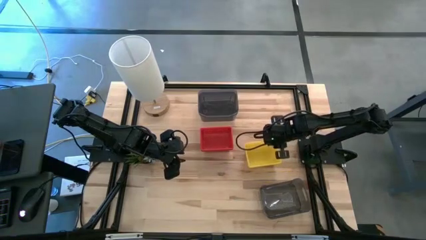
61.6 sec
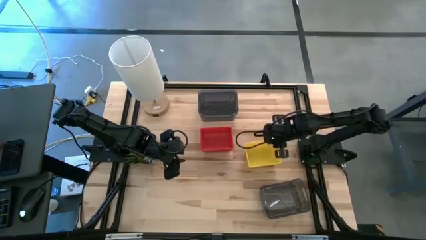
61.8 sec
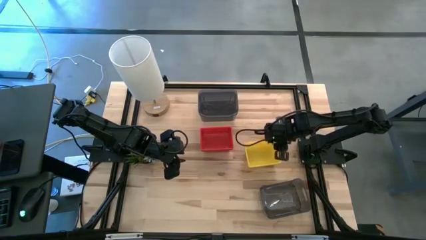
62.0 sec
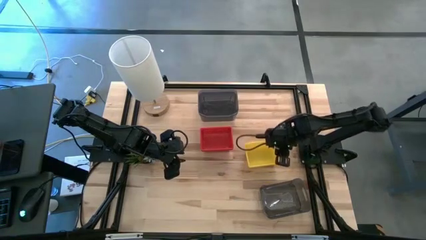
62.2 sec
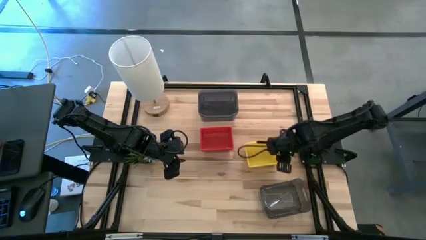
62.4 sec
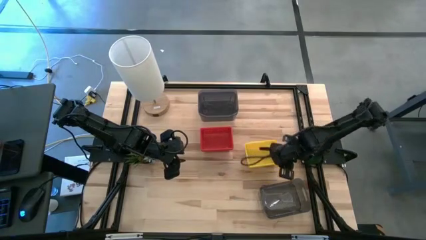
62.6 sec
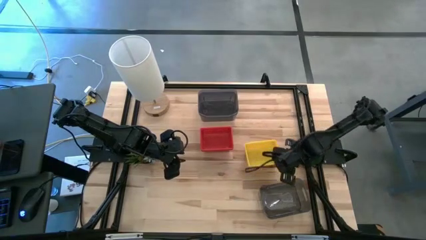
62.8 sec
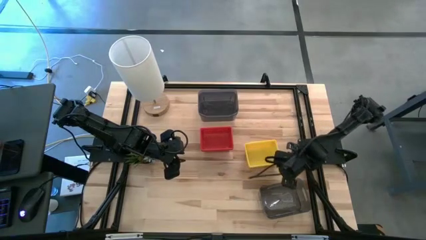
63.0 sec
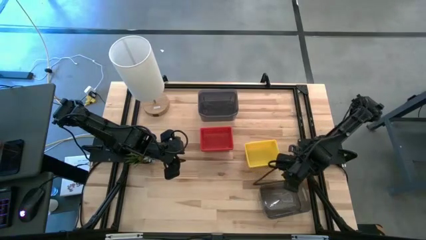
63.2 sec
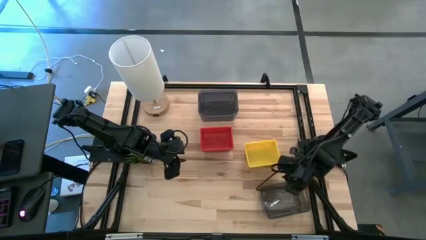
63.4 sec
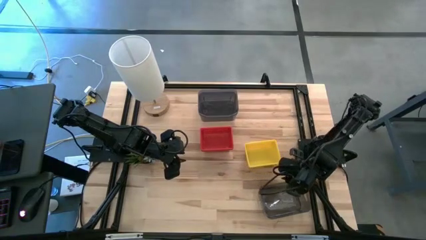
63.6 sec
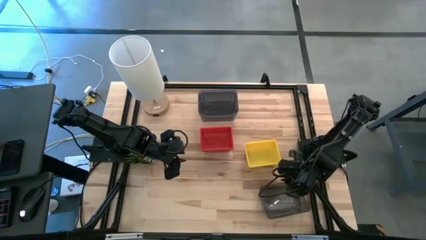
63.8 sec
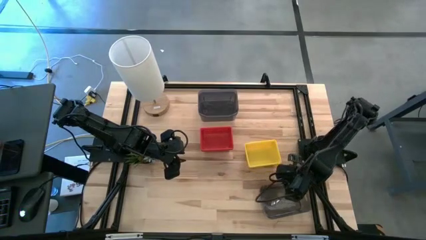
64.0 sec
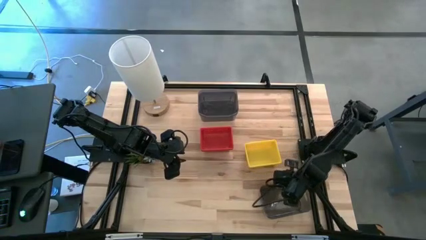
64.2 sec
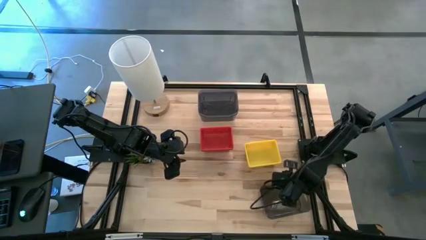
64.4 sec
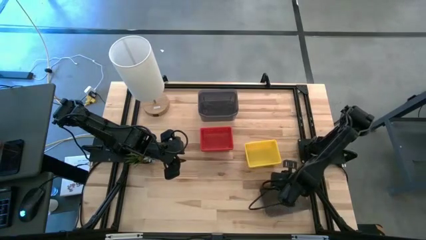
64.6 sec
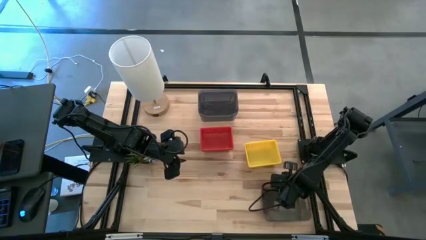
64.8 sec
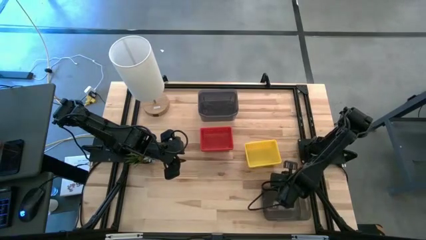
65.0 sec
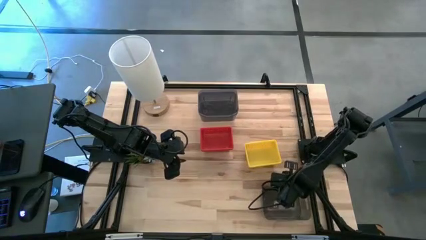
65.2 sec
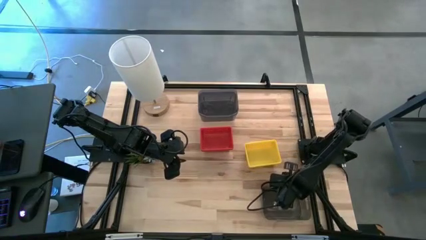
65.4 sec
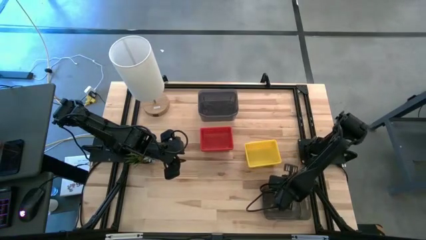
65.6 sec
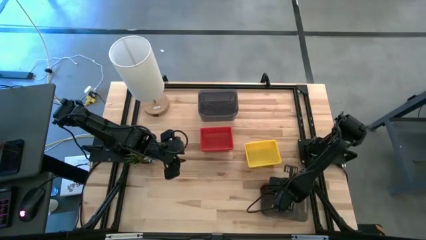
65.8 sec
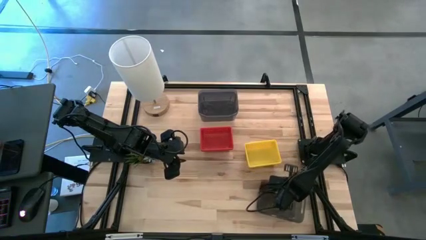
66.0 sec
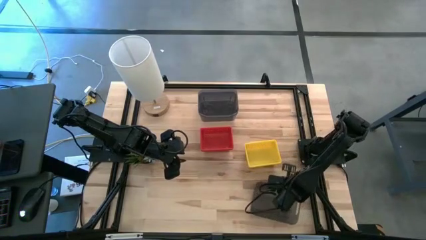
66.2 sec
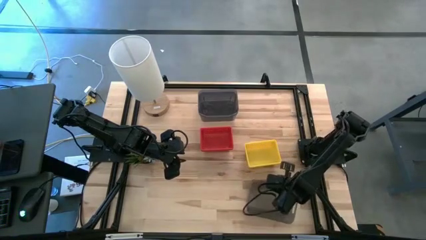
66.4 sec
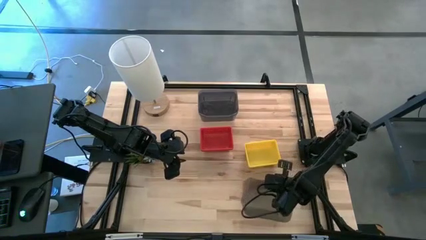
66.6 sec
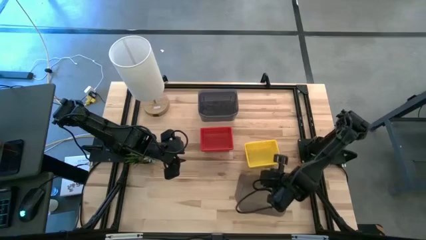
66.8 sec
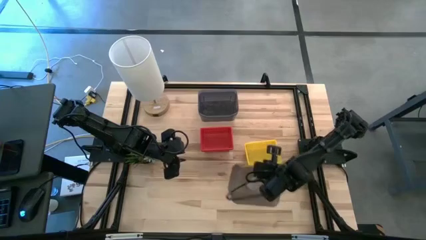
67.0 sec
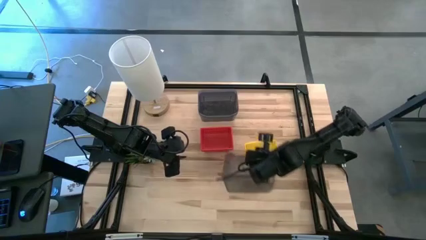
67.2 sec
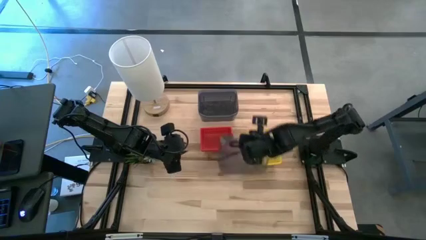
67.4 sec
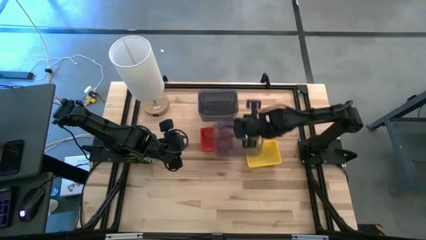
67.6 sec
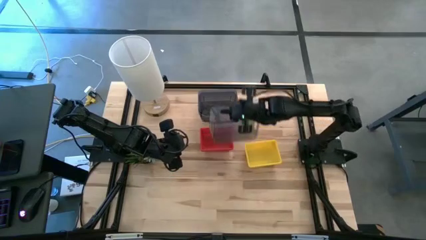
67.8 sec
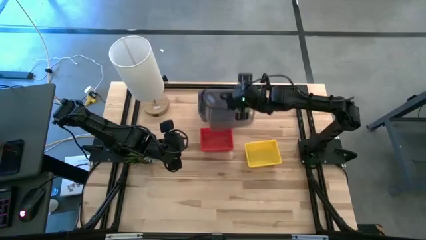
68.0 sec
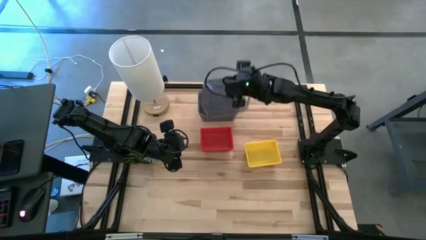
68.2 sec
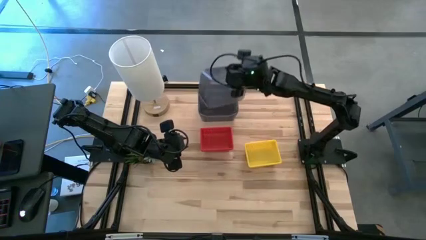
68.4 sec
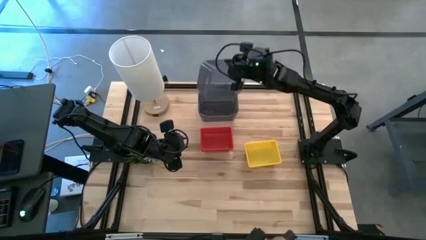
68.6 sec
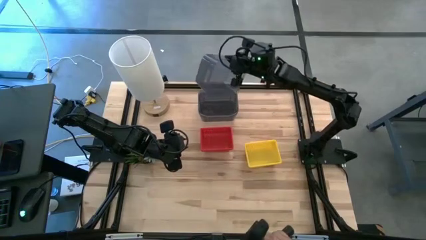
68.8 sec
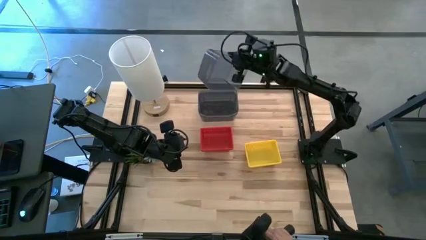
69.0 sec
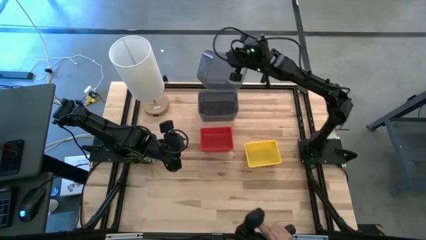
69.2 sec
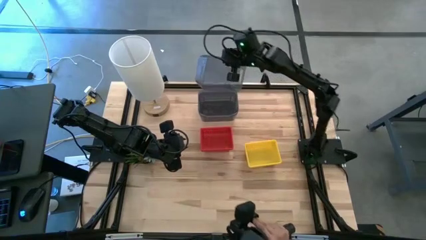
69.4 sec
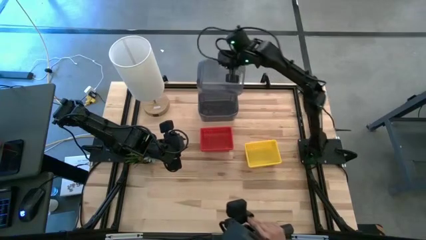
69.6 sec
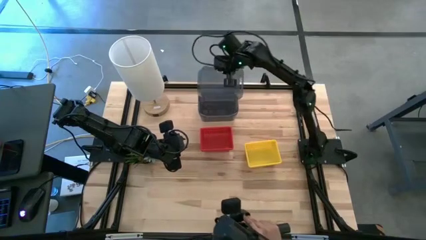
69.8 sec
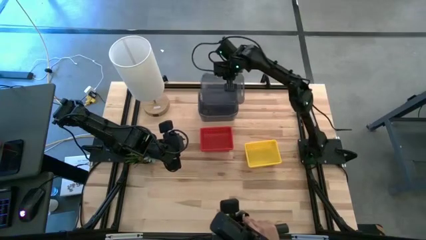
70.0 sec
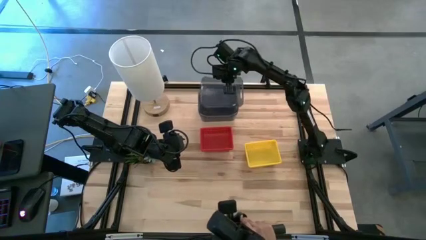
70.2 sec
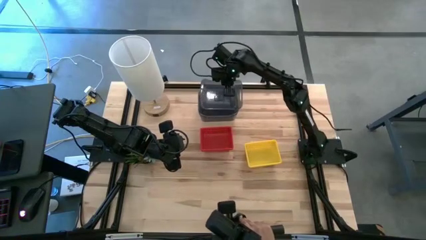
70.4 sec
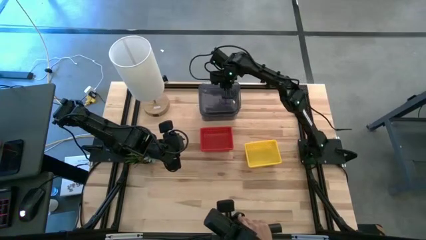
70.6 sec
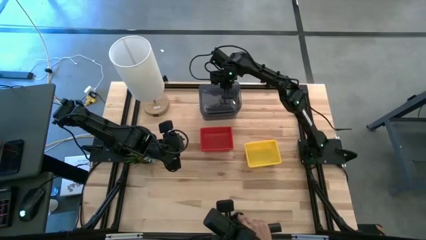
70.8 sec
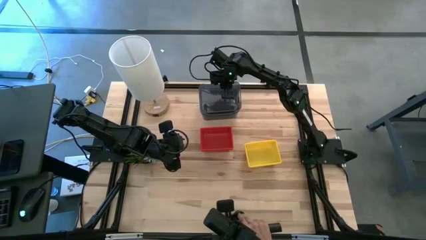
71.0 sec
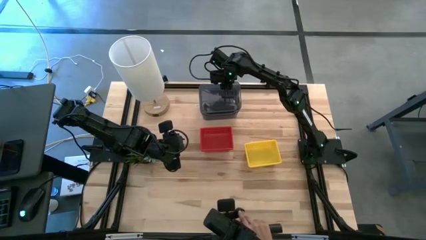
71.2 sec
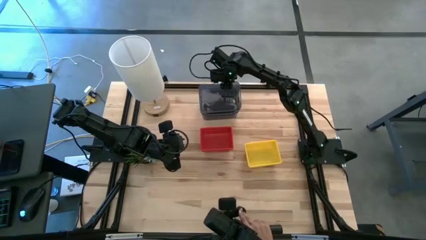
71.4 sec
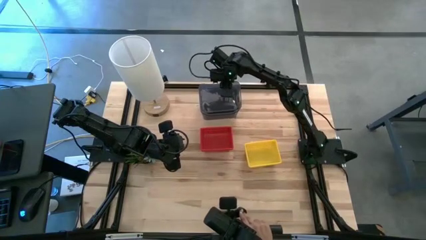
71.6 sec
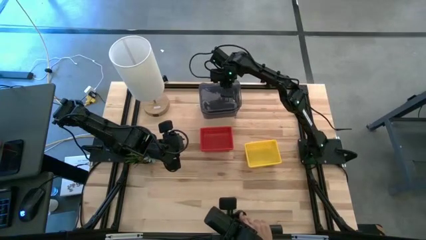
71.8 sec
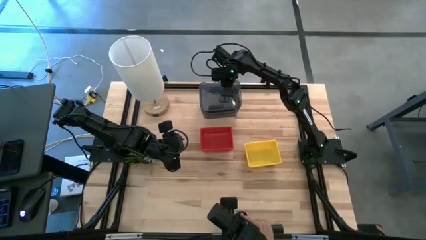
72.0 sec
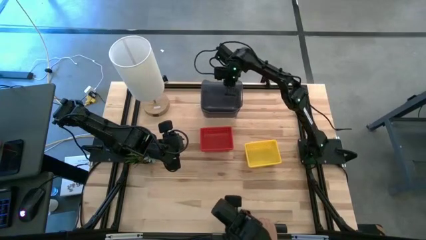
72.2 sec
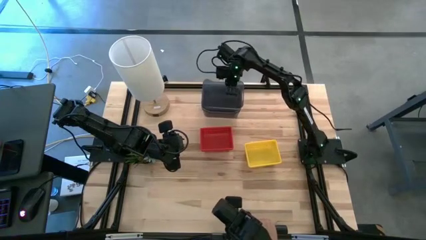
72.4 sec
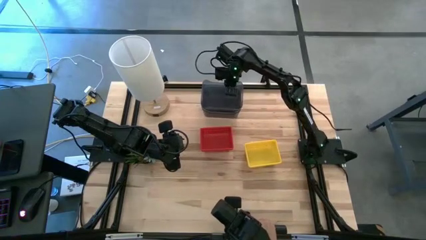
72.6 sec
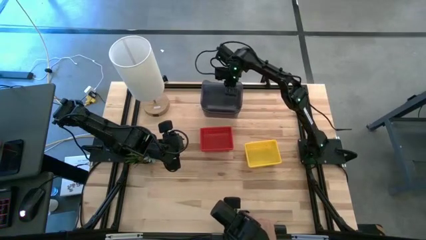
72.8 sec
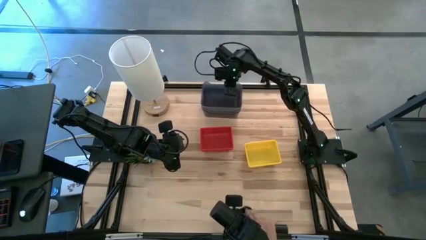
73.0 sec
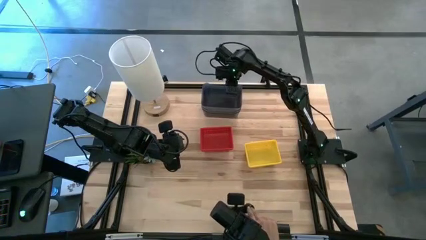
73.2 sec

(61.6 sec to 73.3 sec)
Stack the bottom black basket on the black baskets
